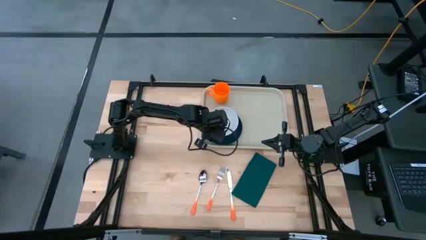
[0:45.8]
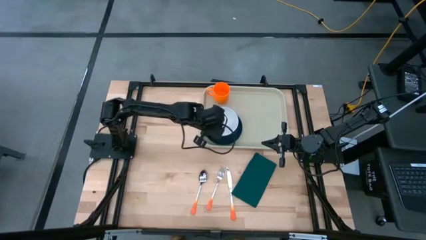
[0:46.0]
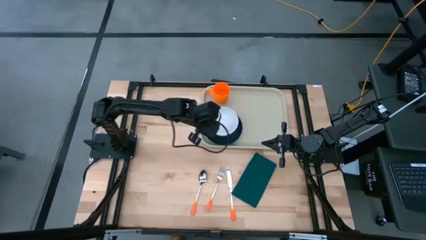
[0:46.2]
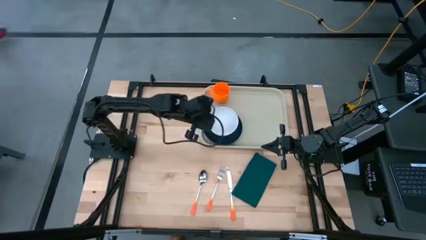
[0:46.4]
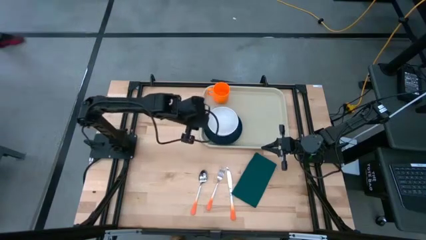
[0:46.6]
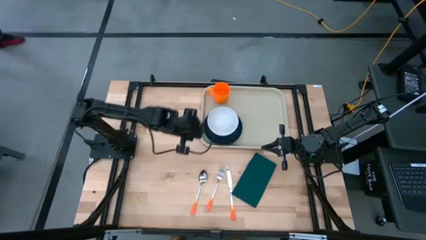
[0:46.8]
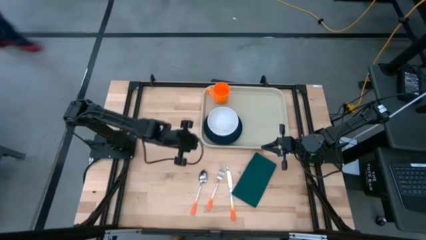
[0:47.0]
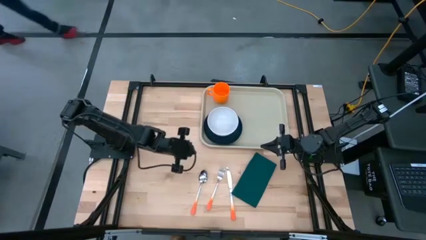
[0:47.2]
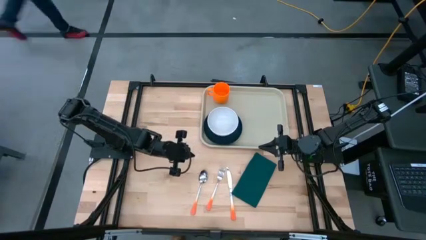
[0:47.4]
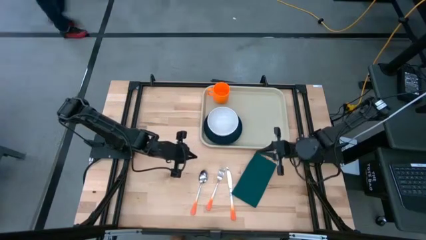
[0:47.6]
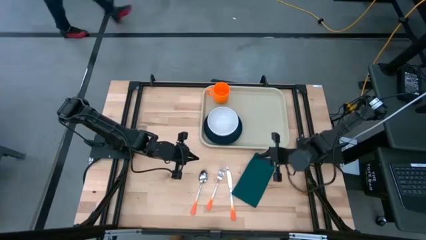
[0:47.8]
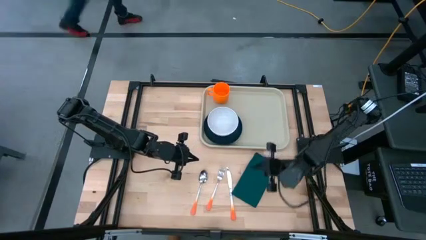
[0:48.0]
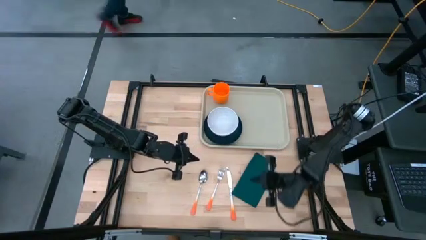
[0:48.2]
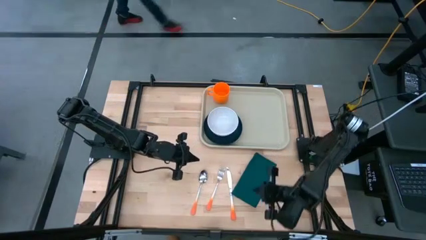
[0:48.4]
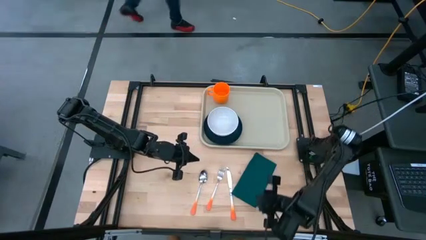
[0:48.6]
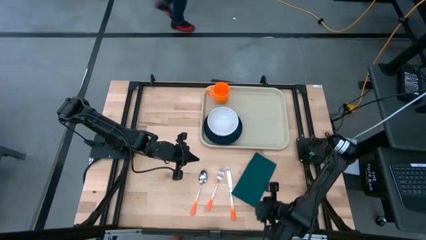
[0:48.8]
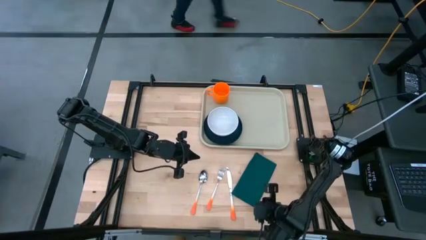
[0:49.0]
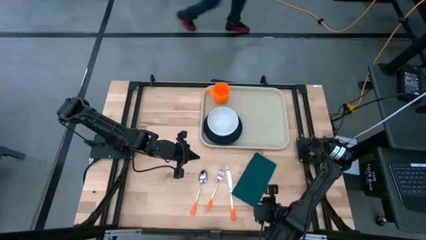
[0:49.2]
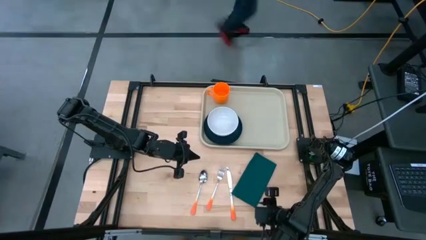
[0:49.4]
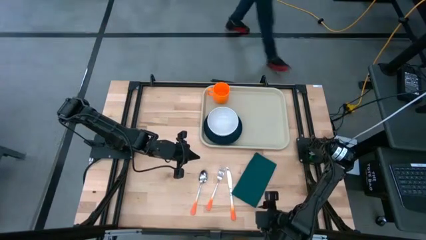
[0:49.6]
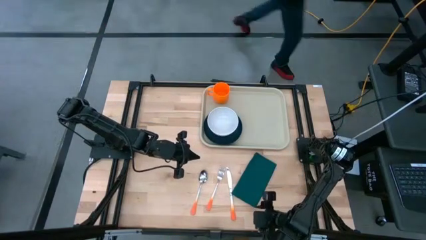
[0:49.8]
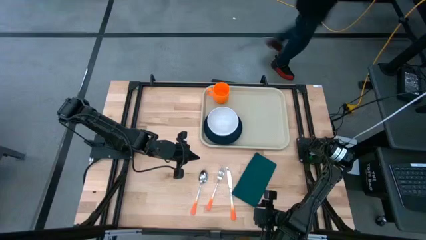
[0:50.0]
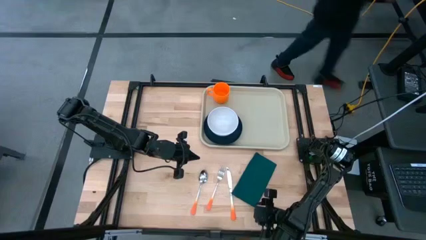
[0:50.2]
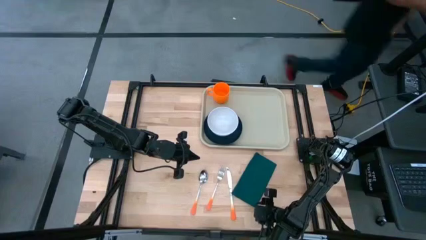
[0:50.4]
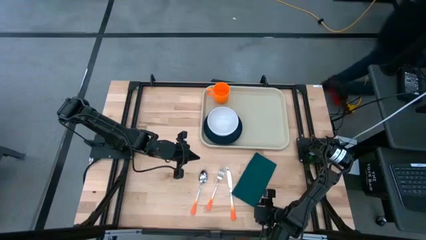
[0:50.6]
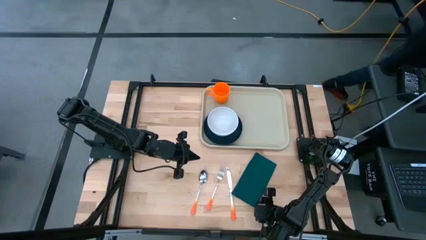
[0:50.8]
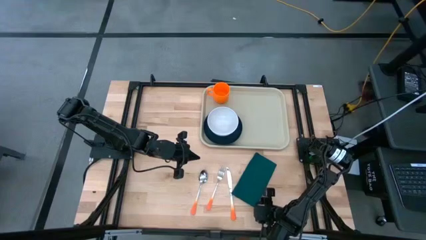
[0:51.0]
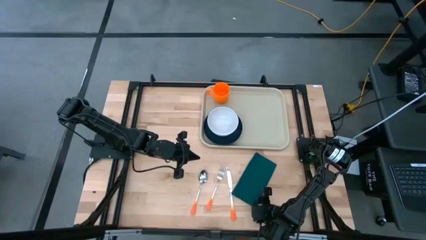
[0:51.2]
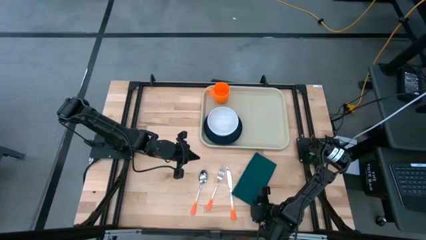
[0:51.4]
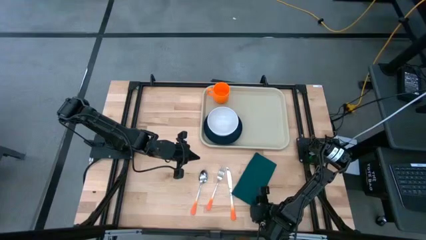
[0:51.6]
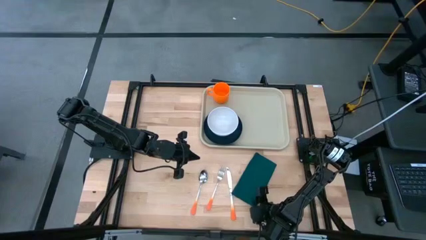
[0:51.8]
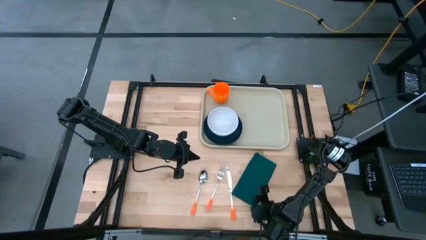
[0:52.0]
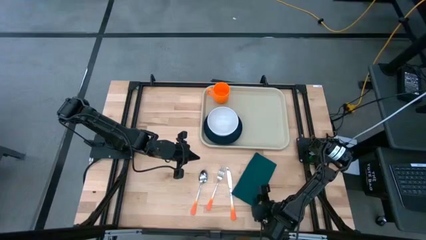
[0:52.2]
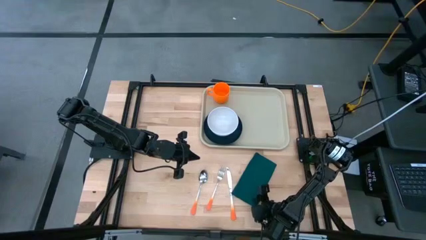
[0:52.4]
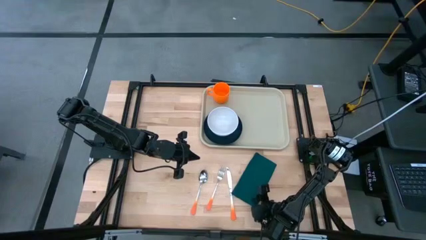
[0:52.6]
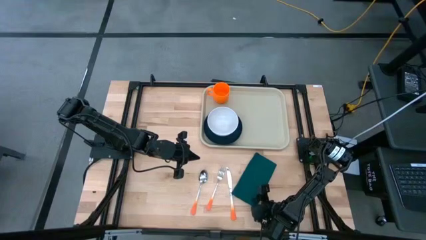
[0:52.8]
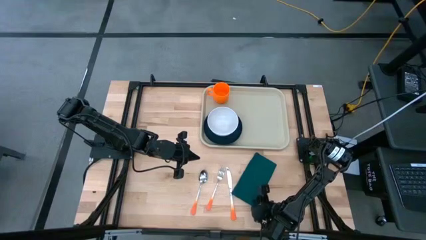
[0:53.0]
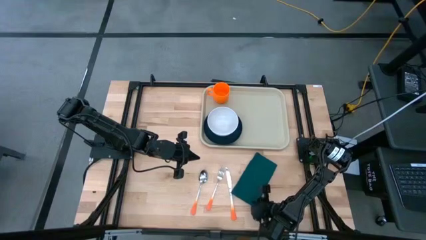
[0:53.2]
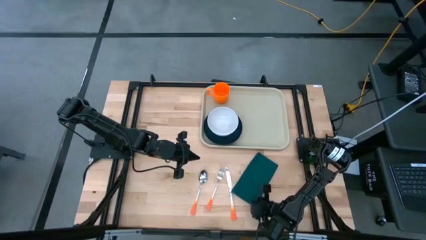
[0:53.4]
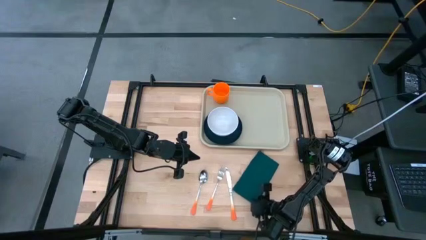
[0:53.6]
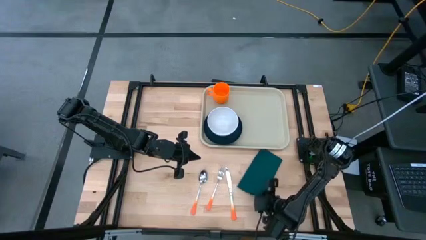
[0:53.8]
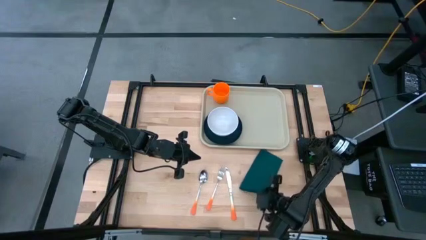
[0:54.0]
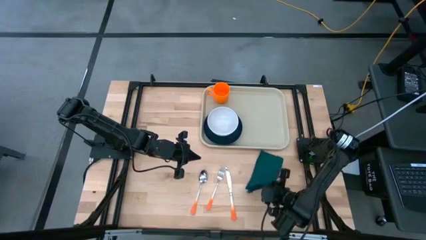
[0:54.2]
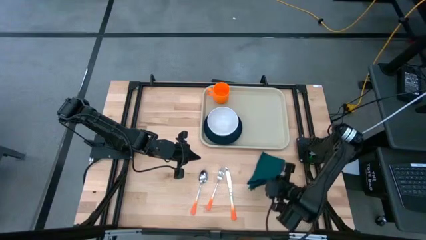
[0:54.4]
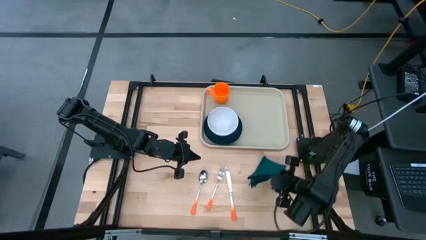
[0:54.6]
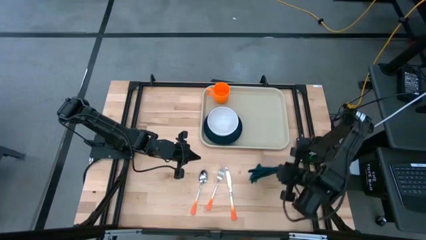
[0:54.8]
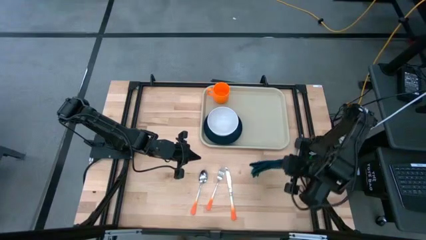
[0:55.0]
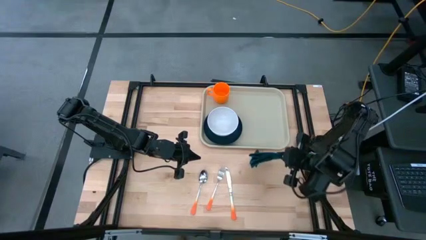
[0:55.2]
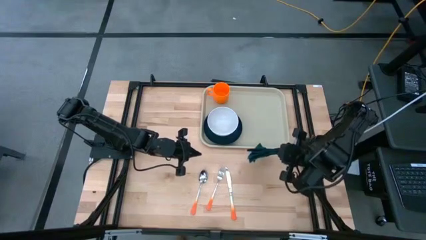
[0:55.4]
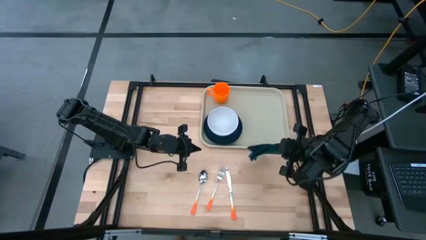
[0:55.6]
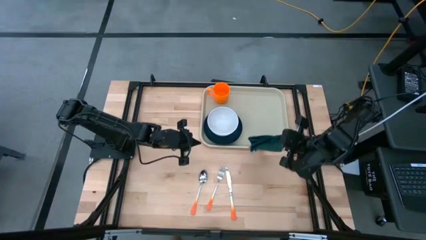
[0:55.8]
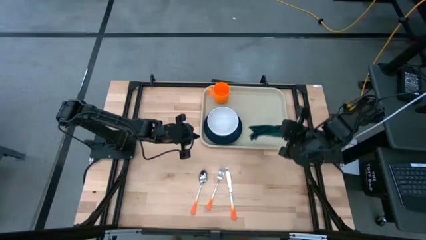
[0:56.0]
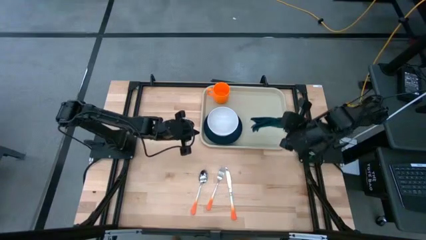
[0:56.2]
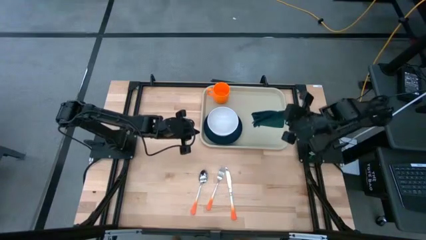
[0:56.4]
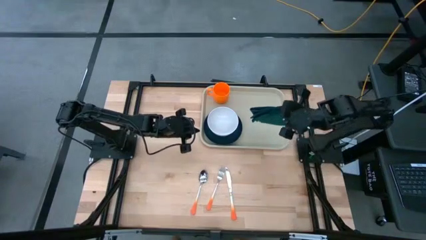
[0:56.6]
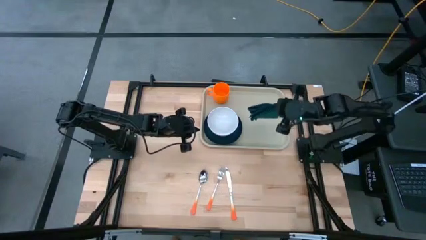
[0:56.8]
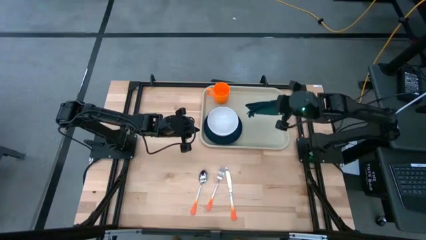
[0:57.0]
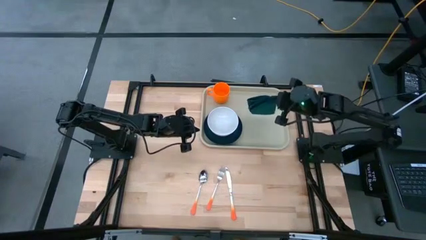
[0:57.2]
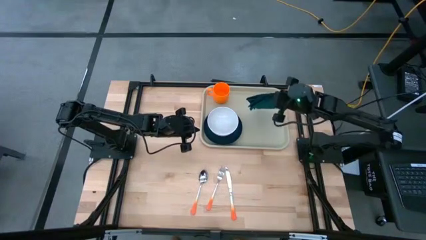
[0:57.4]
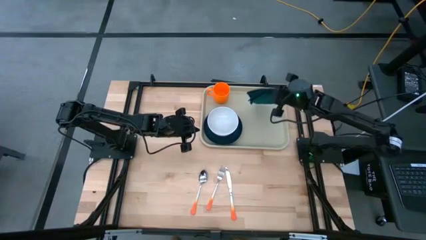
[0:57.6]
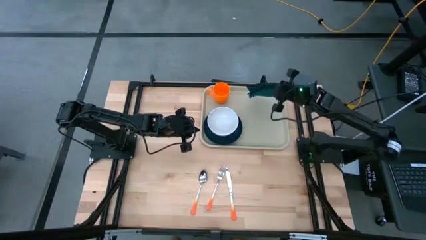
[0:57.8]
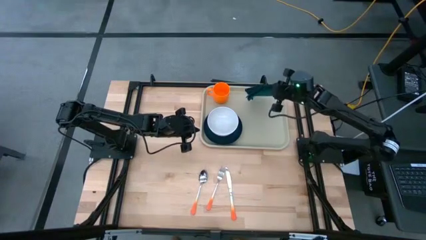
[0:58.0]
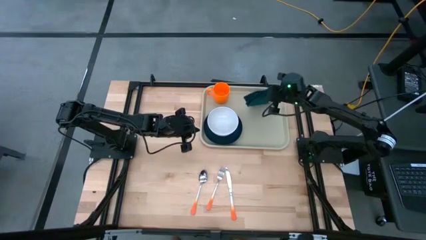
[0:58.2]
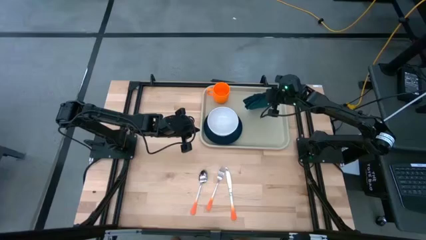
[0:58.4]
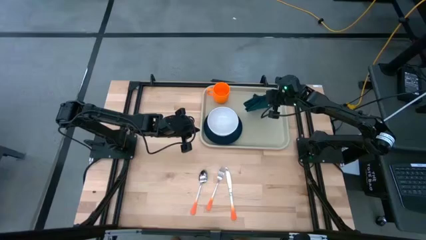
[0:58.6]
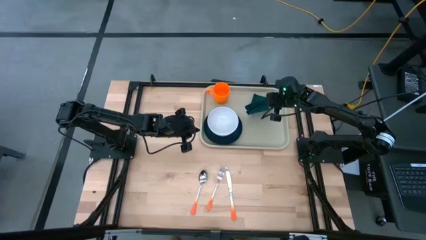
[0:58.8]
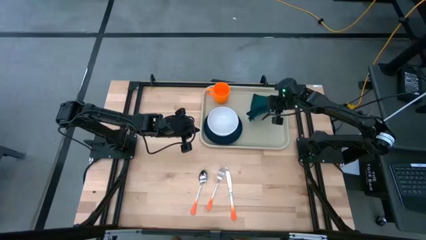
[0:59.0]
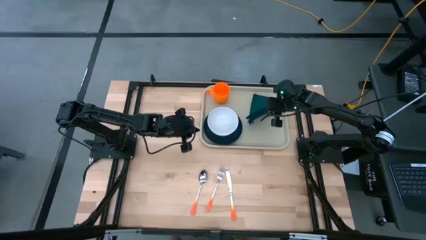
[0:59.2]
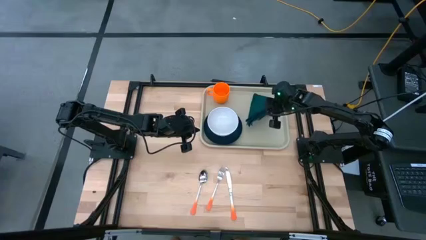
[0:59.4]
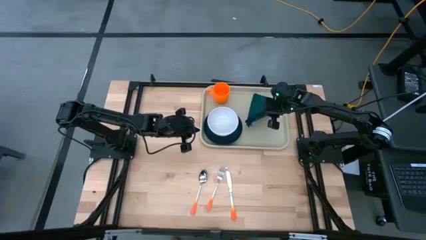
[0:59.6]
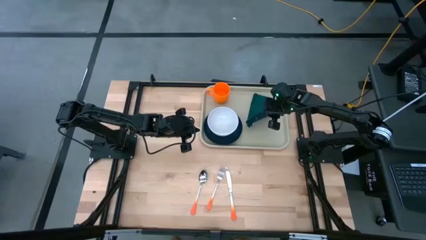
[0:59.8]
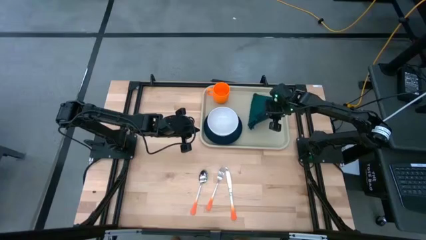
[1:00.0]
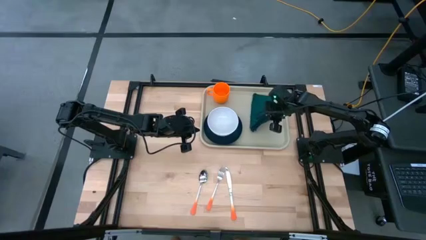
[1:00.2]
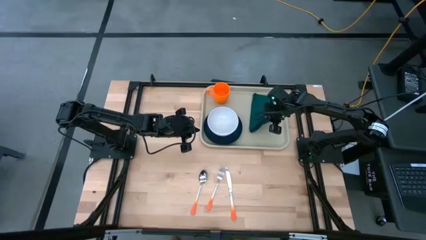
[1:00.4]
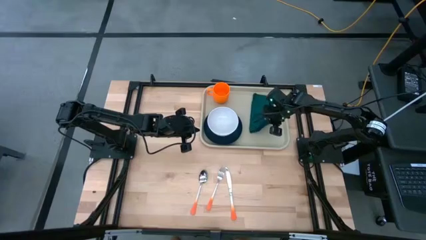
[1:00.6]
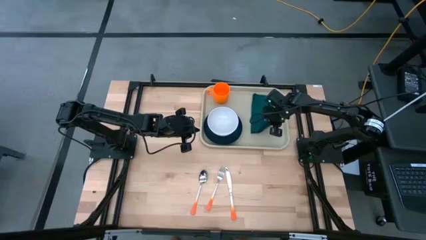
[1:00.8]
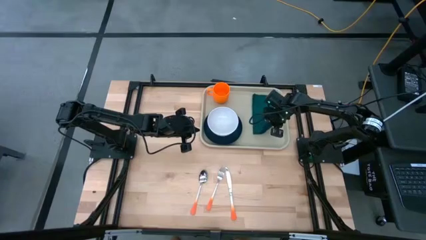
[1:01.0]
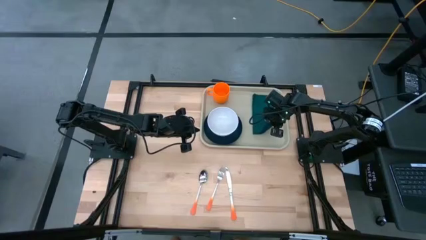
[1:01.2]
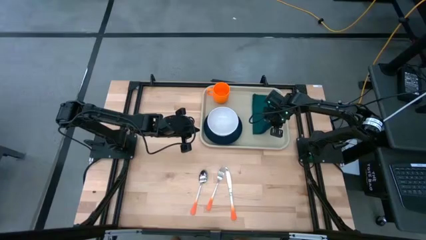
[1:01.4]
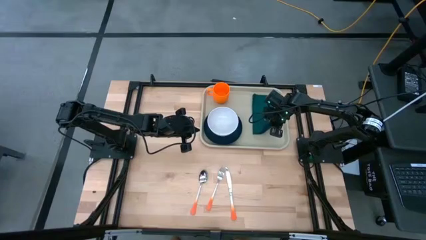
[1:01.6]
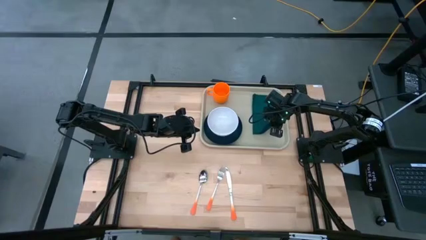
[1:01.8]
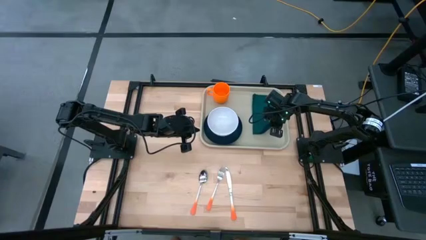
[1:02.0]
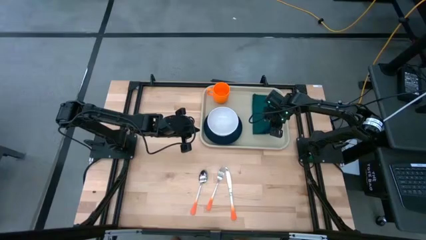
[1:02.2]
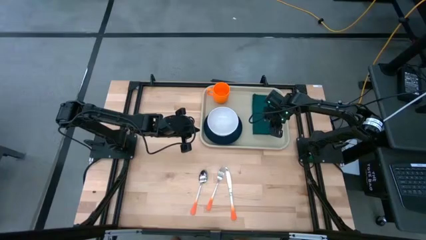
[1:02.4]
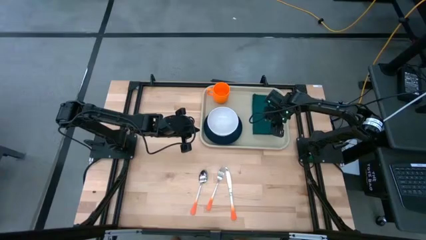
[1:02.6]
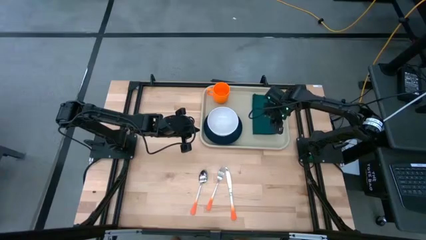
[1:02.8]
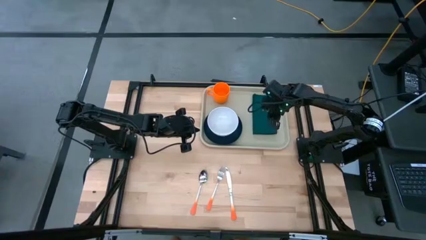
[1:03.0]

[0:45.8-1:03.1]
Task: Set up tray
Put the blue napkin to the right of the blue plate on the serving tray
